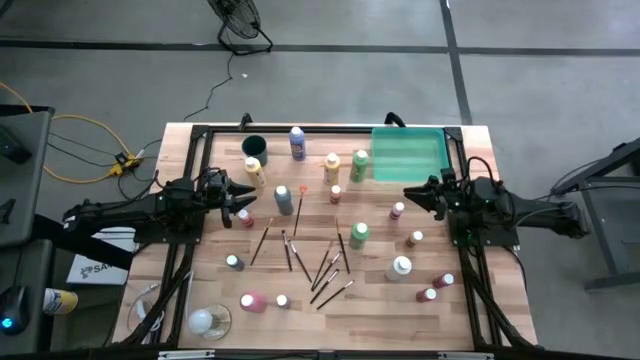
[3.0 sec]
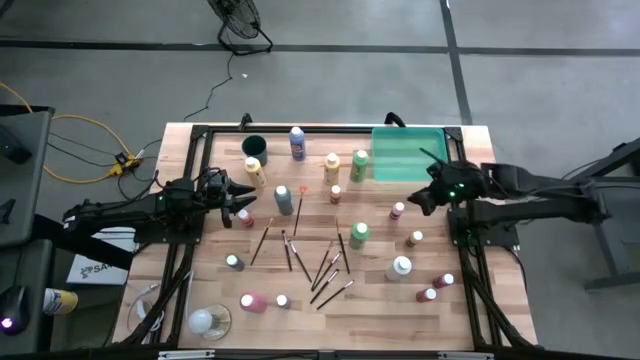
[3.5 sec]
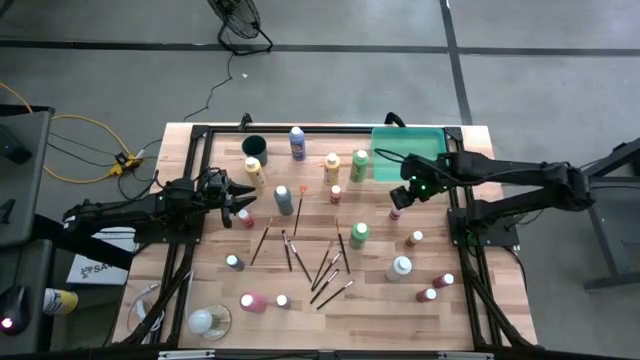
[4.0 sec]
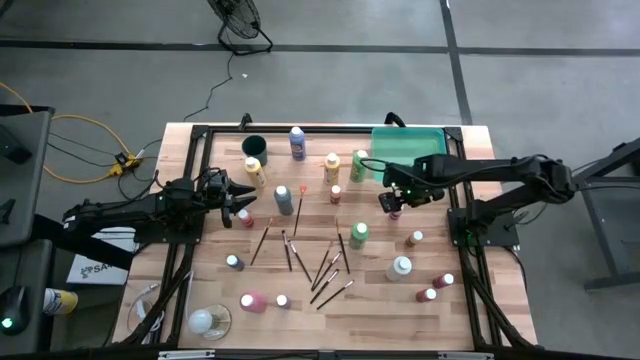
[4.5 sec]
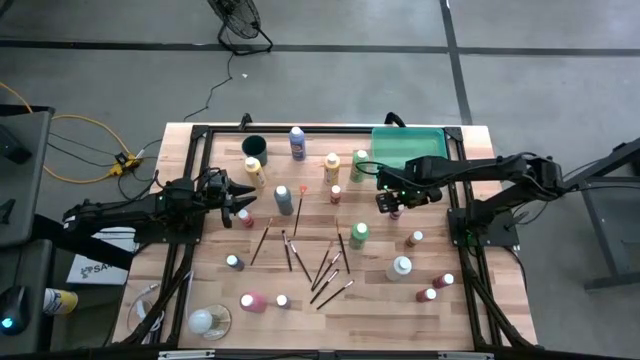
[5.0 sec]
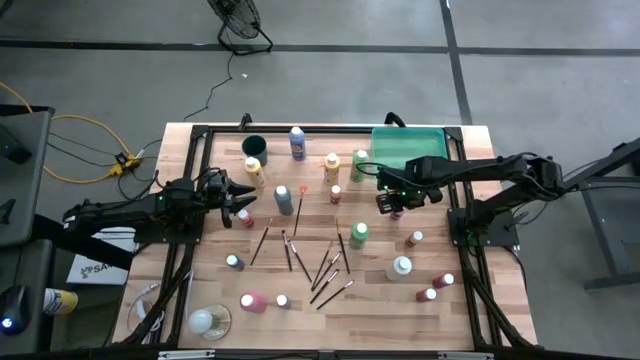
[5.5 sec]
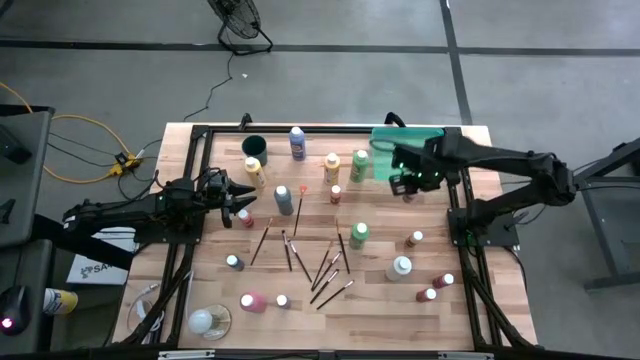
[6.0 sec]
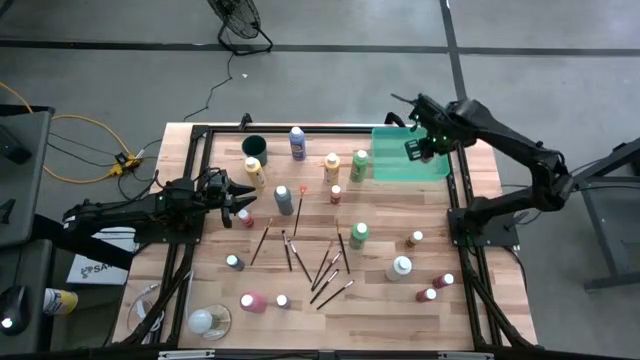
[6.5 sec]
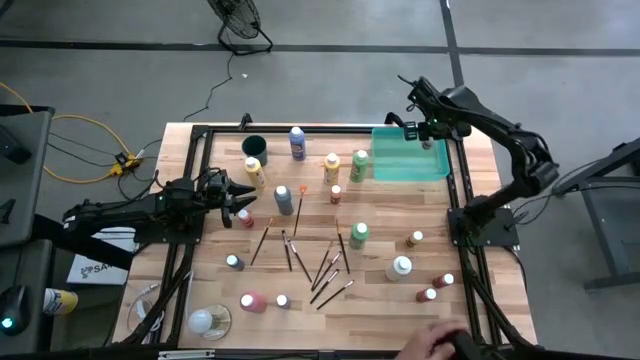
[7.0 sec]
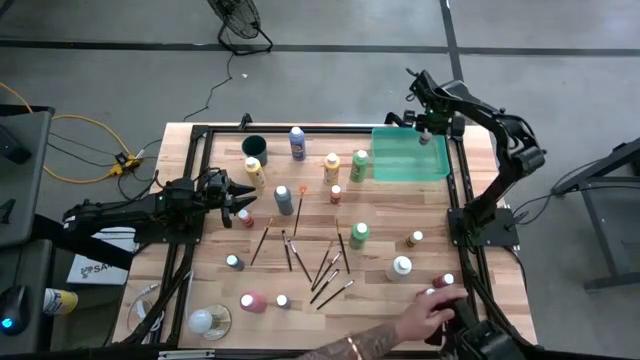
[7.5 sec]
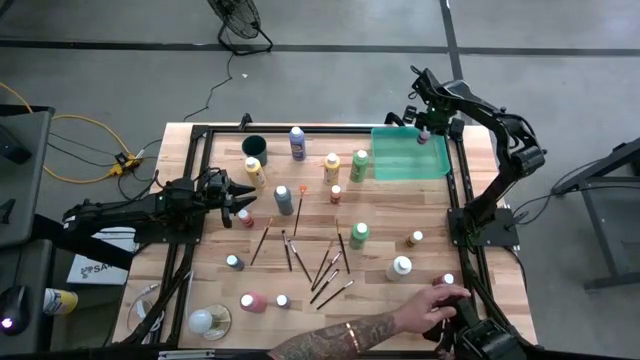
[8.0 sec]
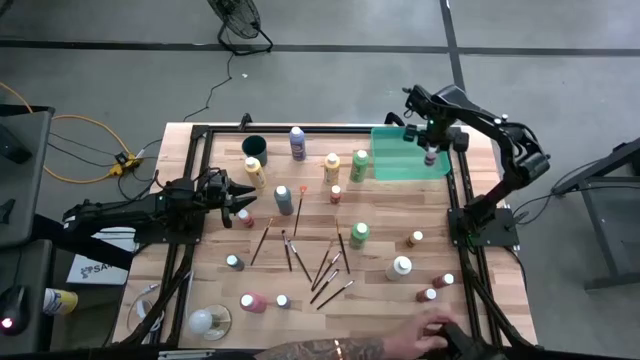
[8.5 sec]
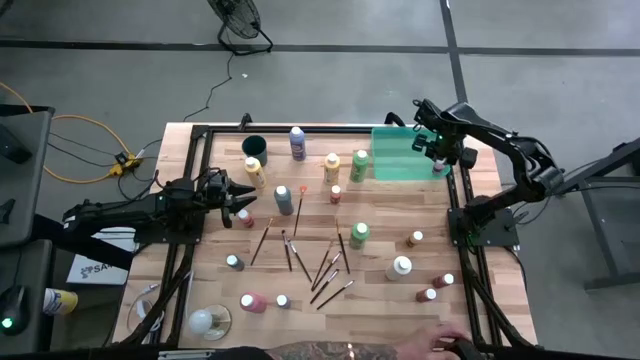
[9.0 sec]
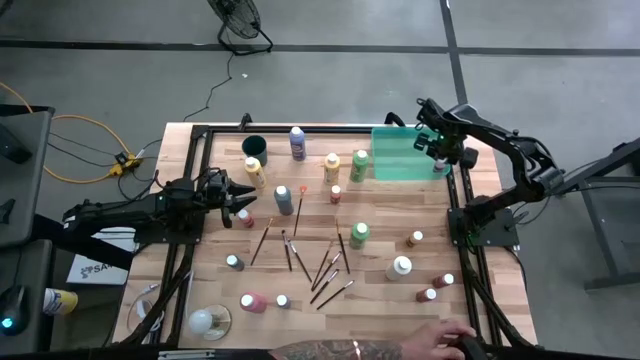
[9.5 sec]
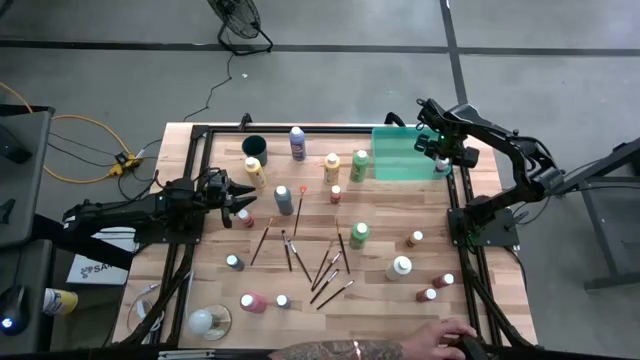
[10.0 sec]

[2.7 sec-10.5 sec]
Task: Pick & Place Paint Supplies
Put the small light pink paint bottle into the green bin

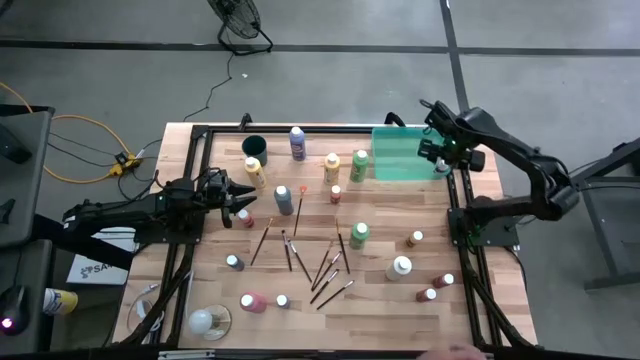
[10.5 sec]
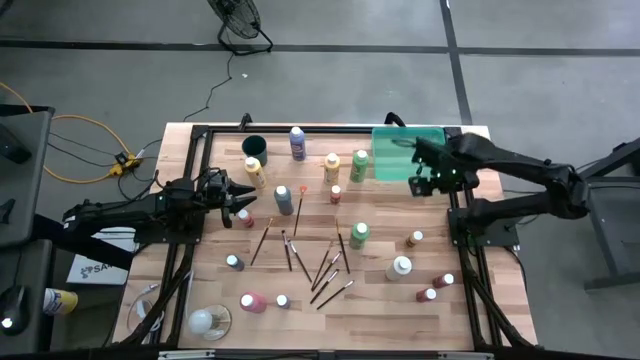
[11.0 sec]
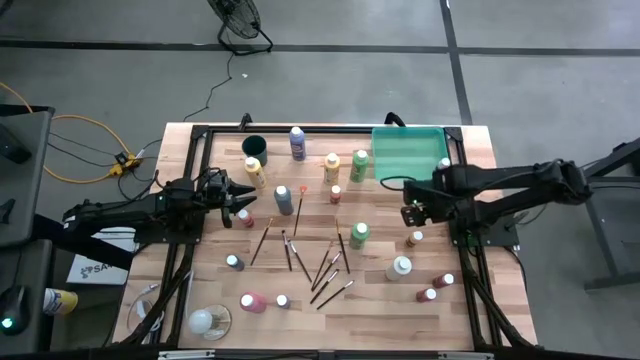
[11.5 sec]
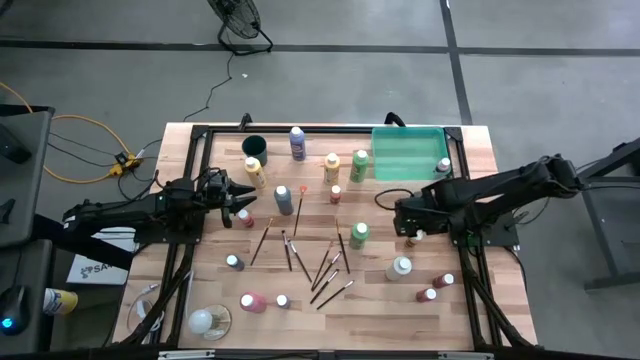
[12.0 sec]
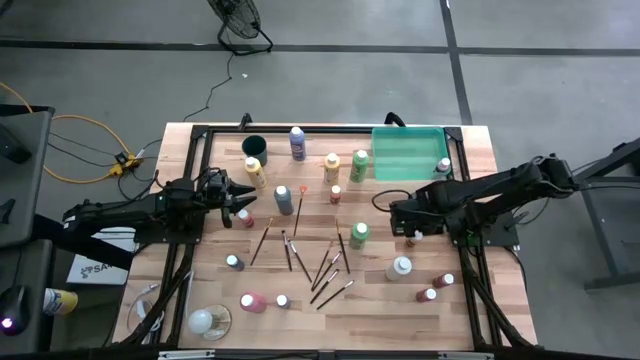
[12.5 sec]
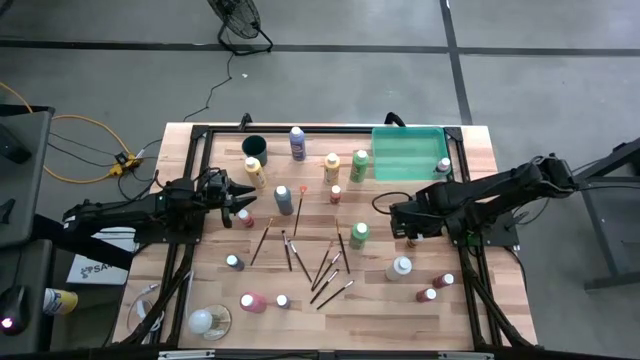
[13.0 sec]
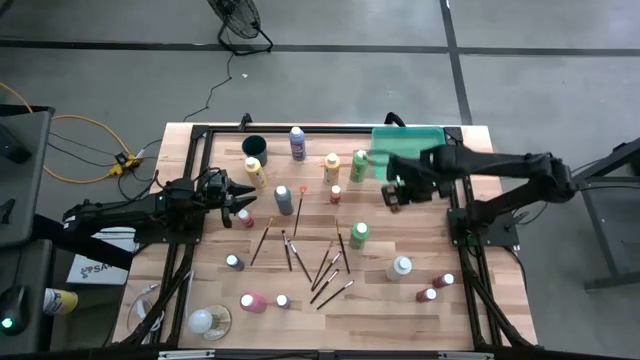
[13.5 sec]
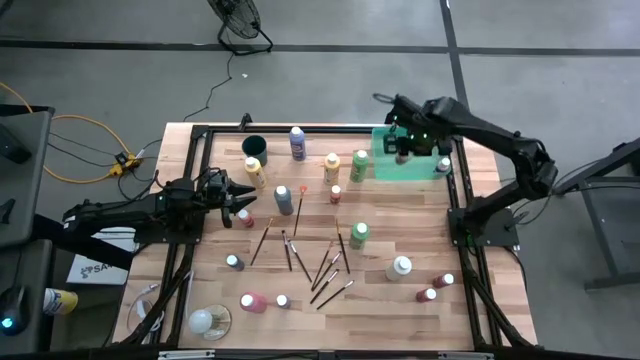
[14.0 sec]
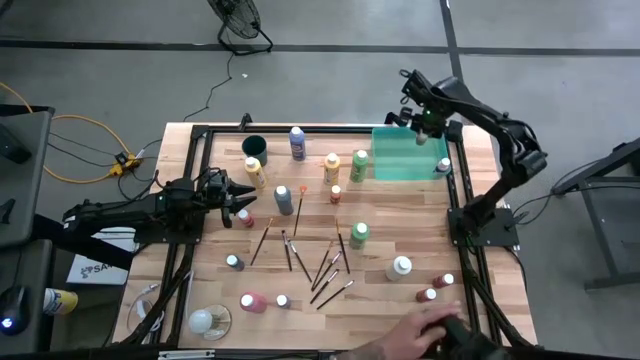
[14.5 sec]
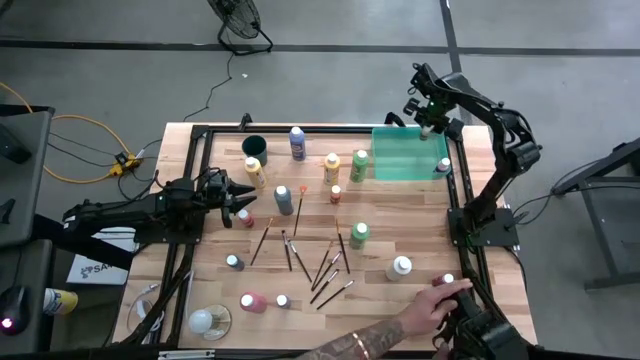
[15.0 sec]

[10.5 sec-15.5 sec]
Put the small brown paint bottle into the green bin

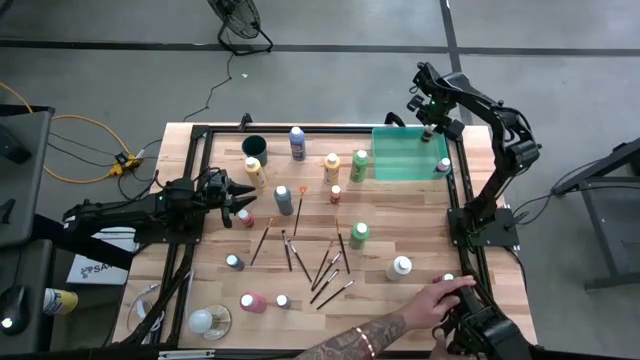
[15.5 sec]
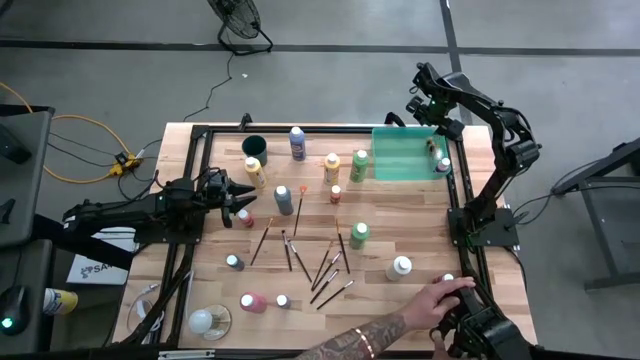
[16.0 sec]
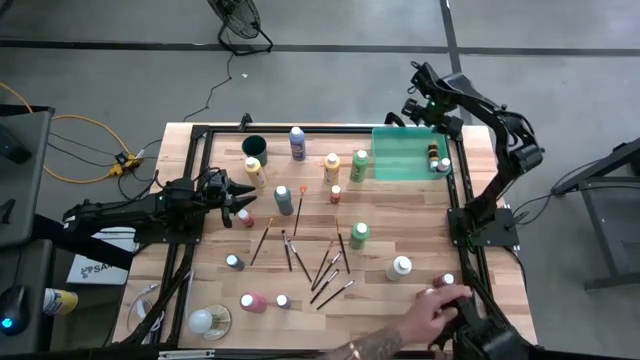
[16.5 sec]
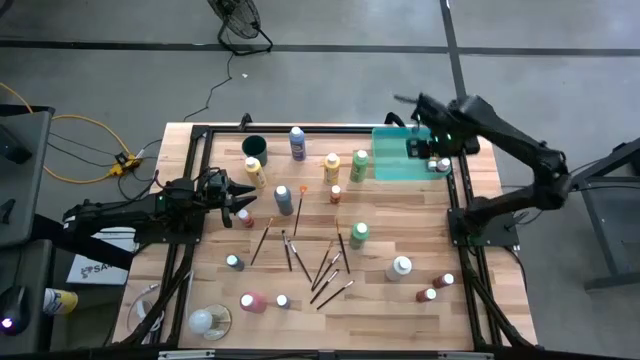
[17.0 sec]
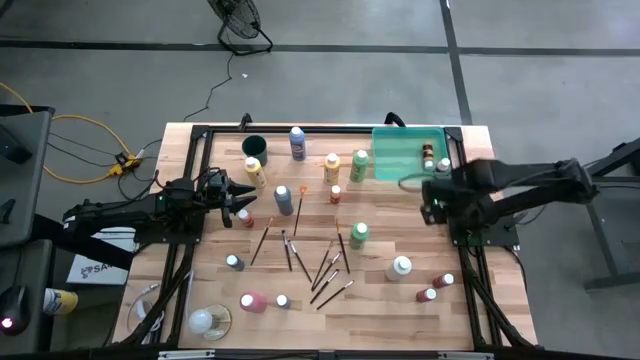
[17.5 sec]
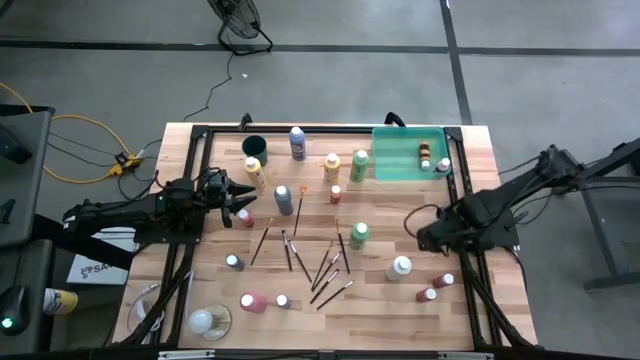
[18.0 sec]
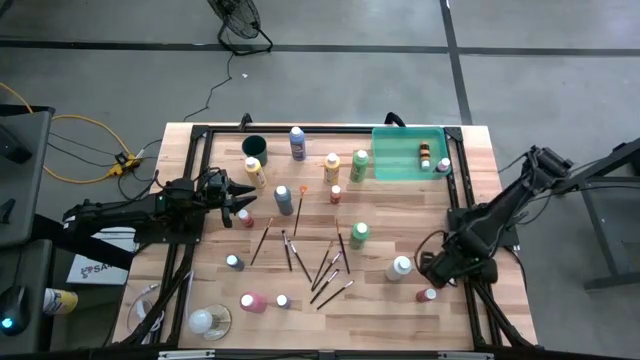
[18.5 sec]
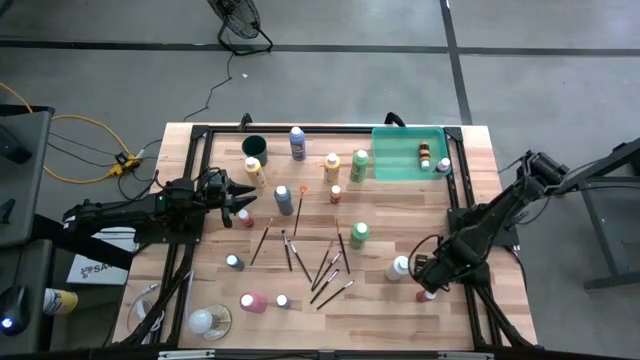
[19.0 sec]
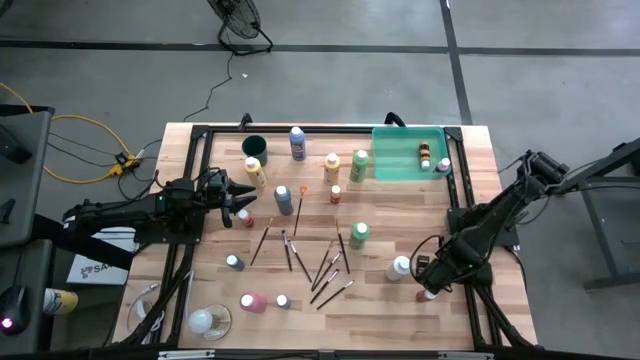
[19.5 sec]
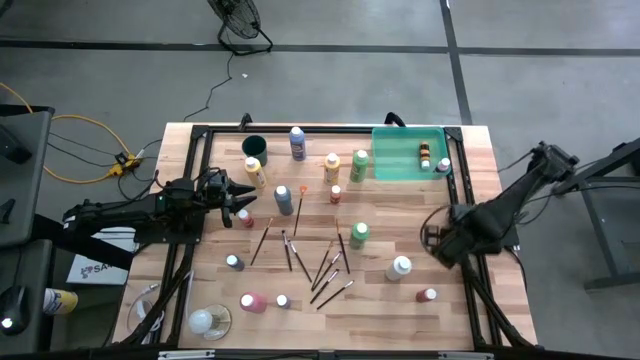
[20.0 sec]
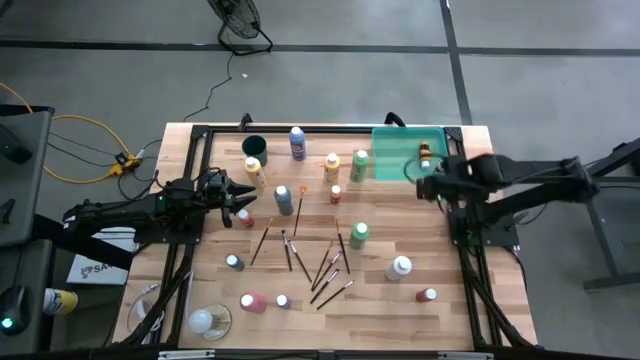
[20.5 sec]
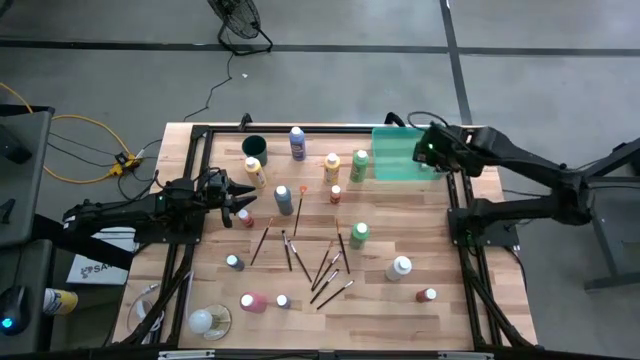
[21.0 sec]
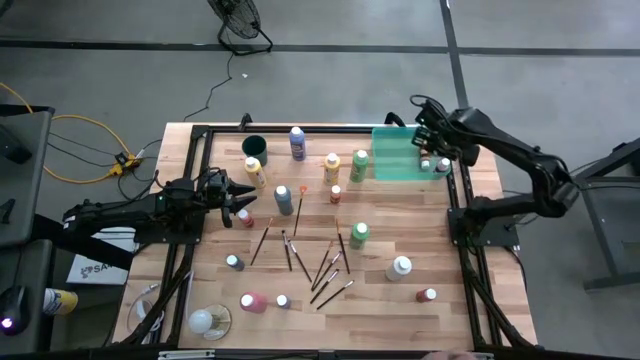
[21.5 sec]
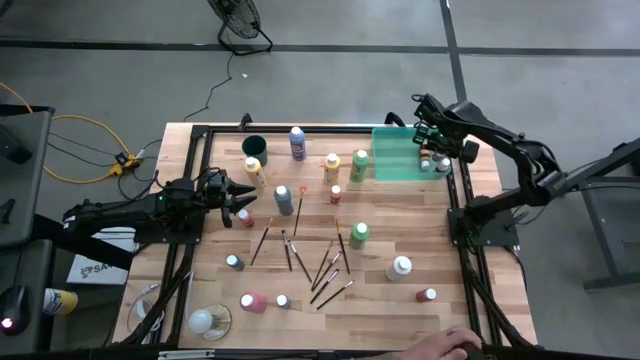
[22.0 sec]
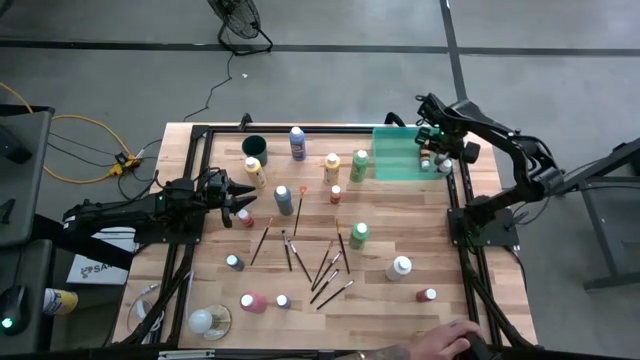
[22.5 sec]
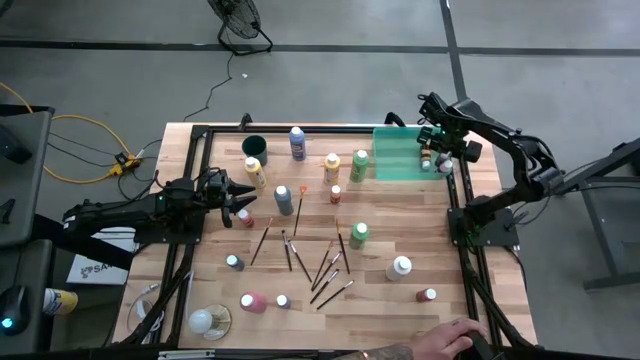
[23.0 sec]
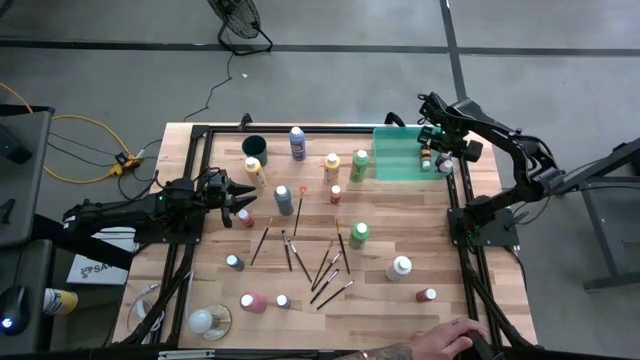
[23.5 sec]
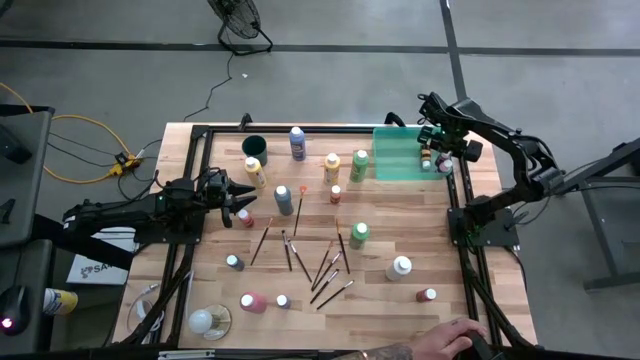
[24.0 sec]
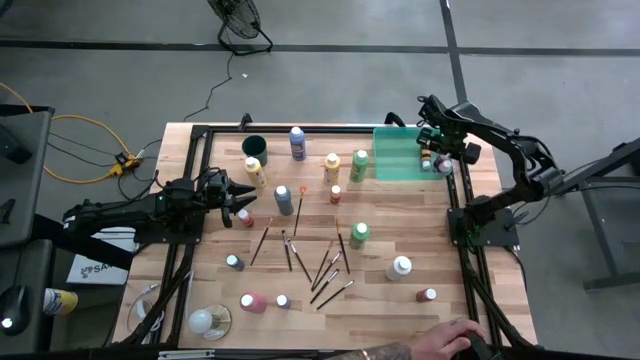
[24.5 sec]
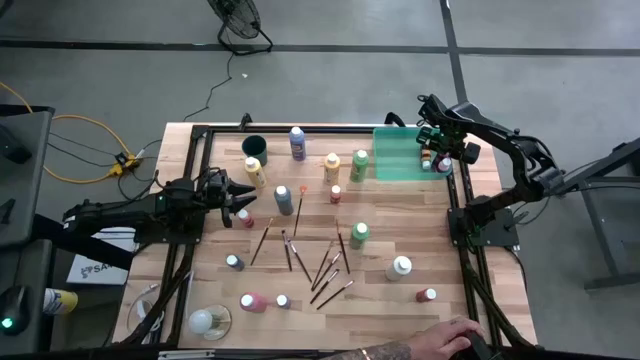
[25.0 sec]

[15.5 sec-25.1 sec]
Put the small pink paint bottle into the green bin
